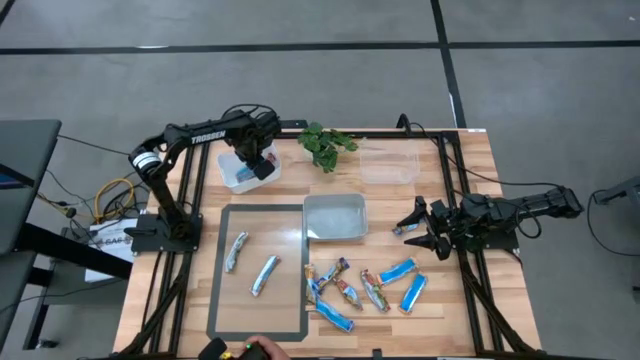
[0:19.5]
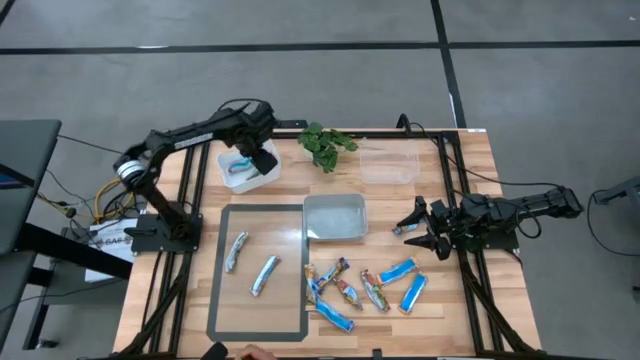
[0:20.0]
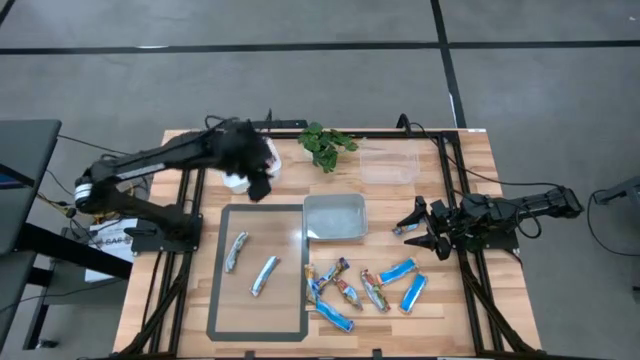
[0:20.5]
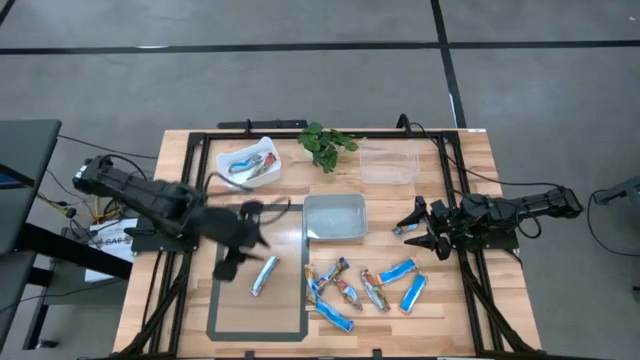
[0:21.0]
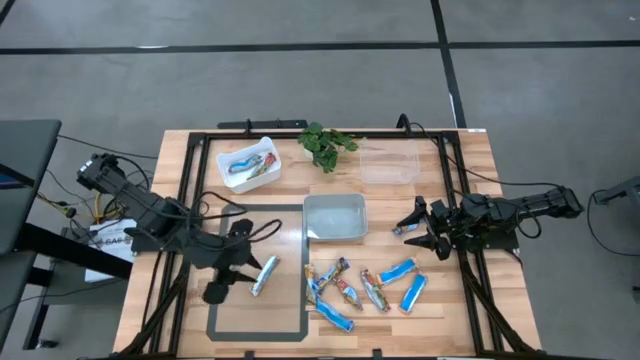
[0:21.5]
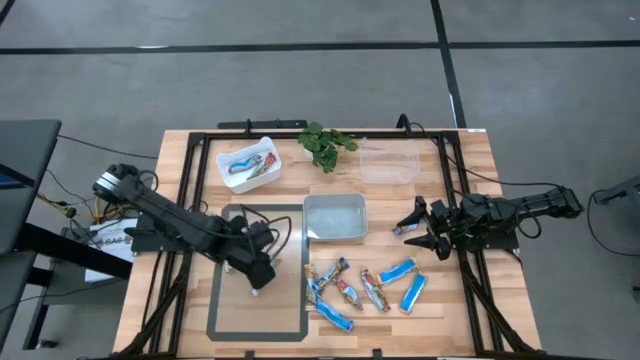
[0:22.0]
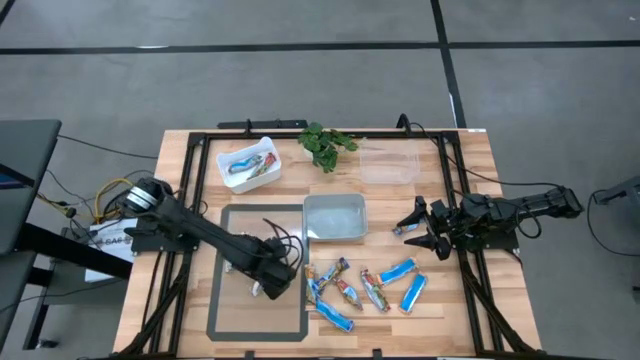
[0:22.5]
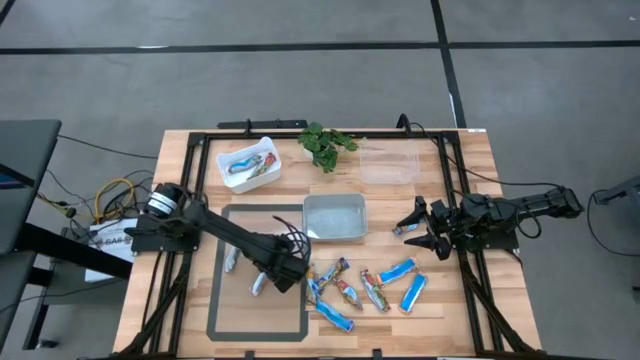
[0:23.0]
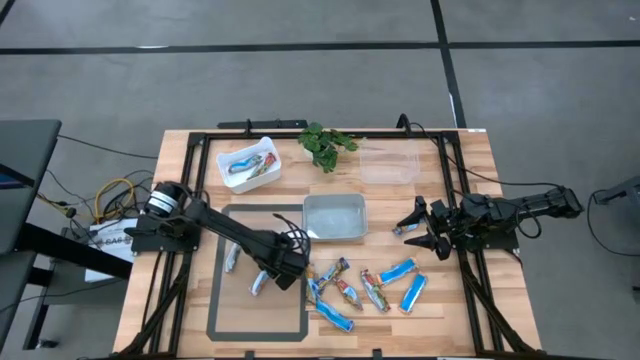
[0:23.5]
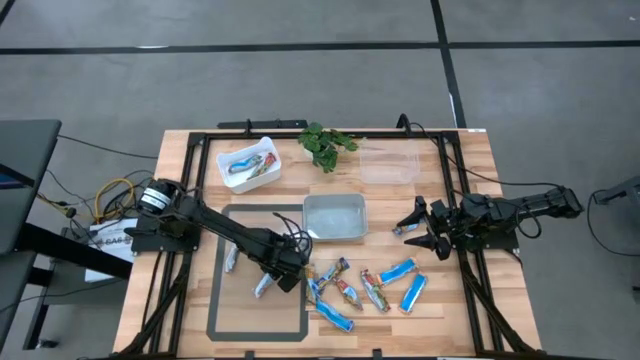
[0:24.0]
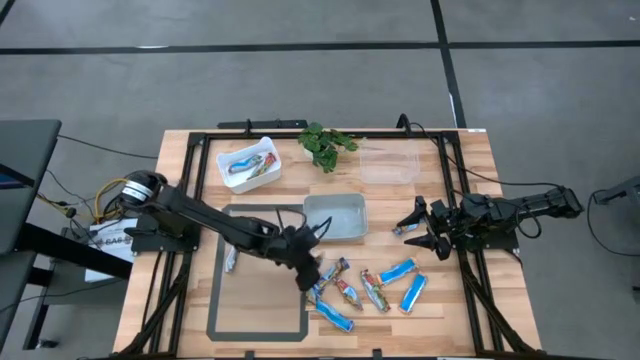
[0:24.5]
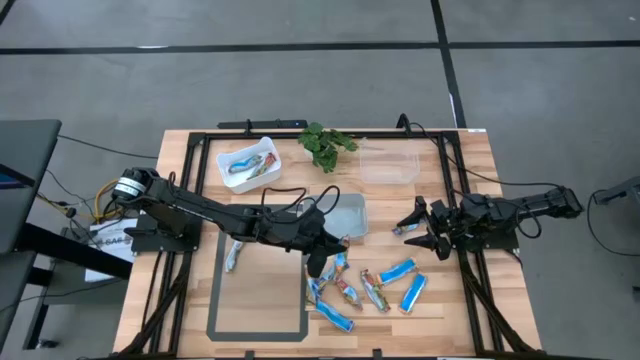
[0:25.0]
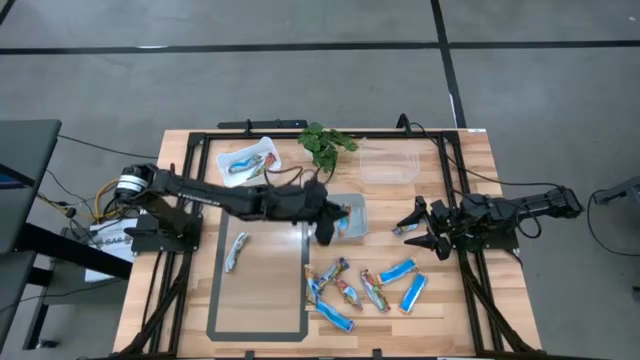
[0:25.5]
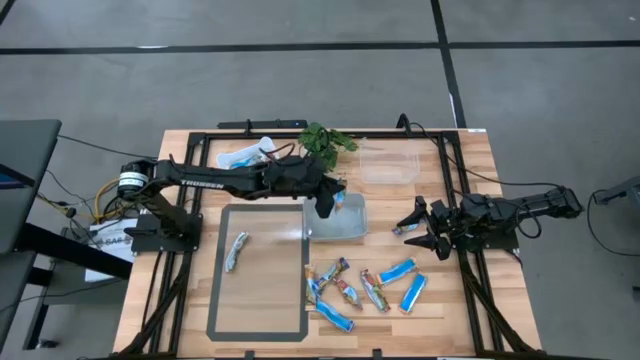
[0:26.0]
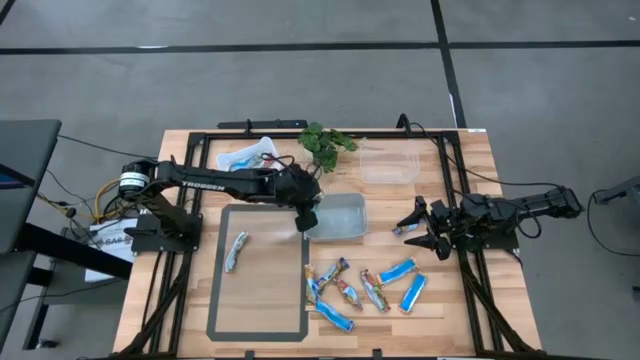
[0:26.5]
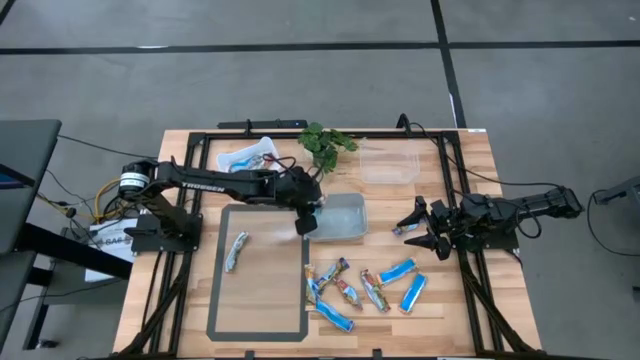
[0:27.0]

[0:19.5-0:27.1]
Task: Pick and place Granola Bars by type
Put the yellow granola bar into the gray bin

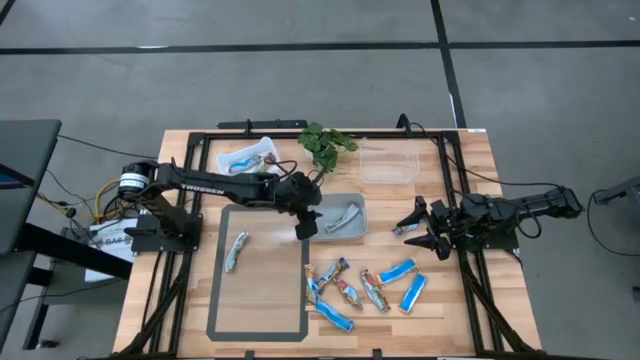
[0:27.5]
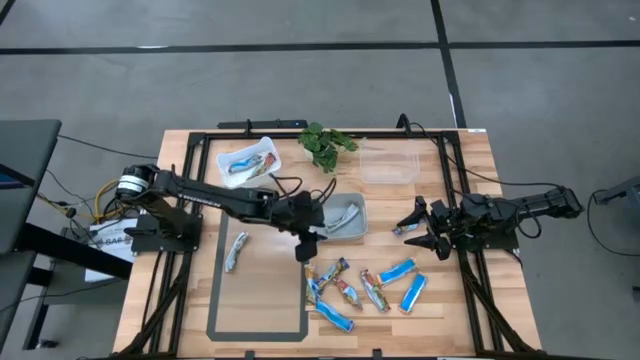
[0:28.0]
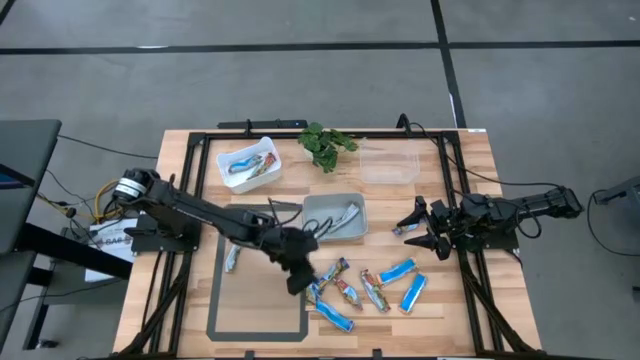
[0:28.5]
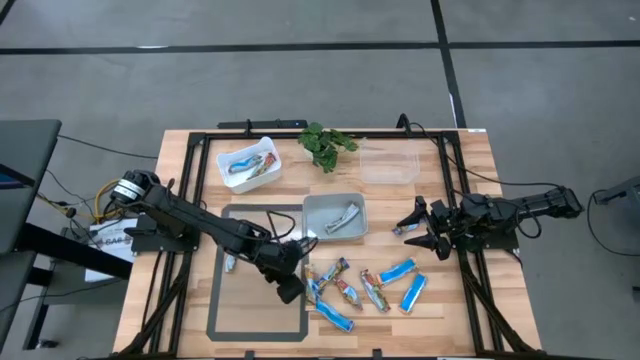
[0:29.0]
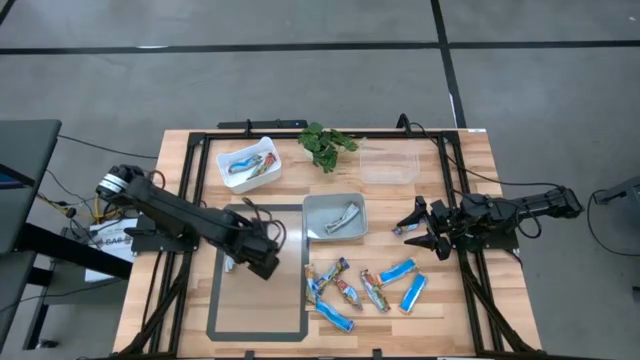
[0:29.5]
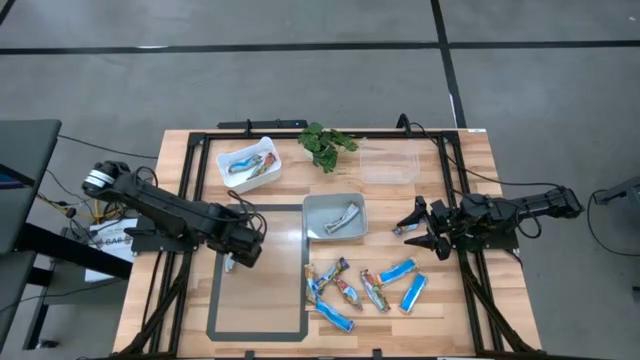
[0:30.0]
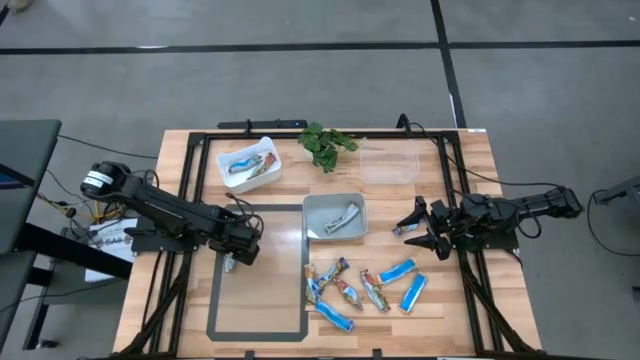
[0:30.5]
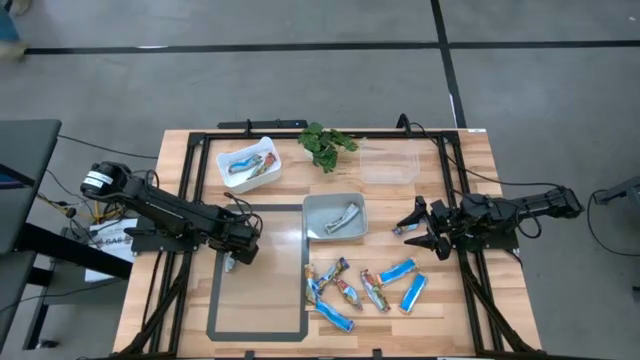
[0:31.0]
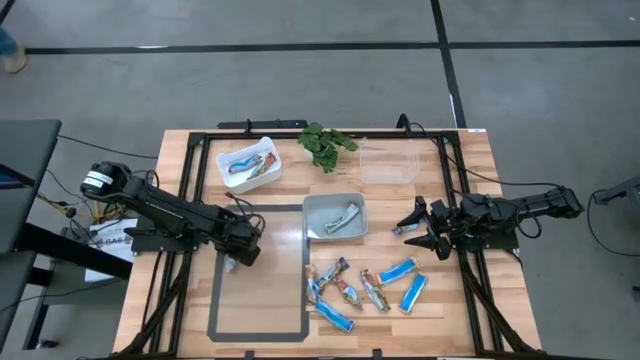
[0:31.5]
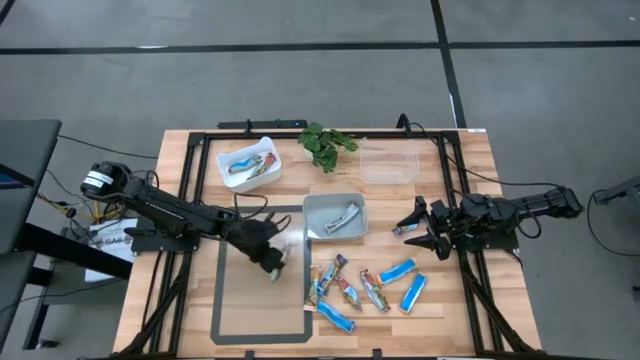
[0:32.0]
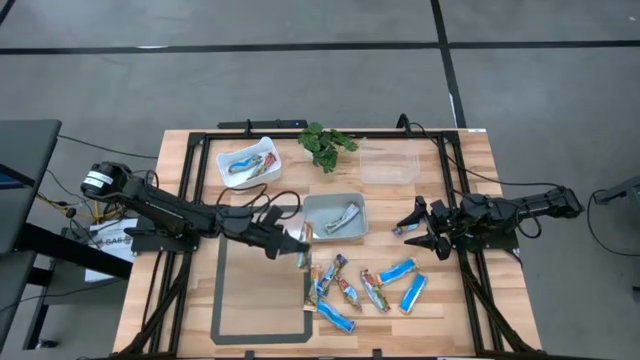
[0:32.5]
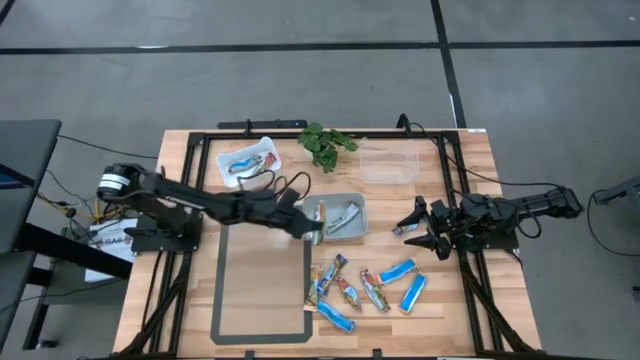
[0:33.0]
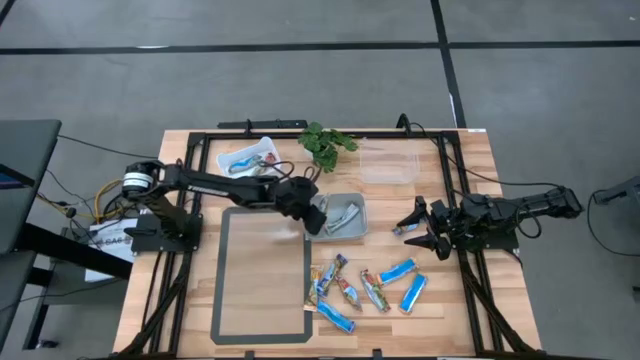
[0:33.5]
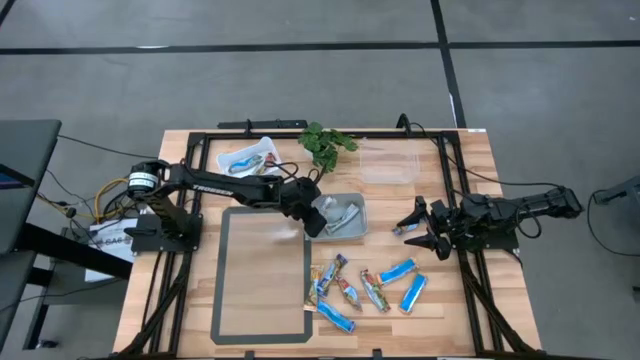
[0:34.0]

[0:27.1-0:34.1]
Put the yellow granola bar into the gray bin

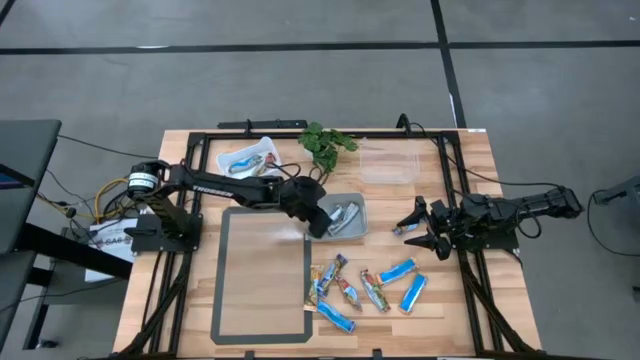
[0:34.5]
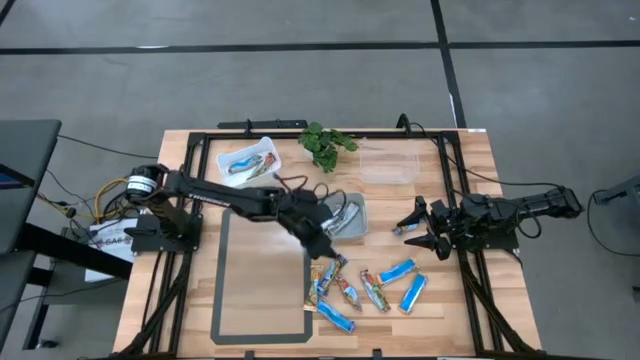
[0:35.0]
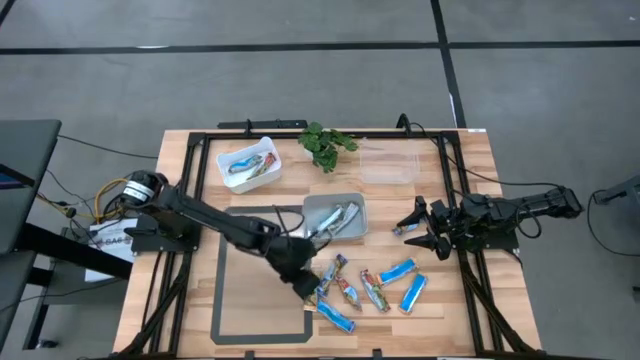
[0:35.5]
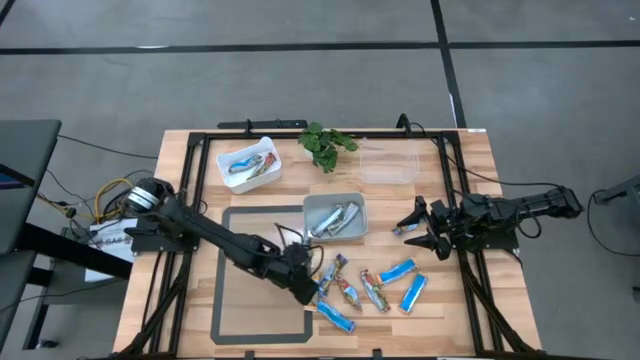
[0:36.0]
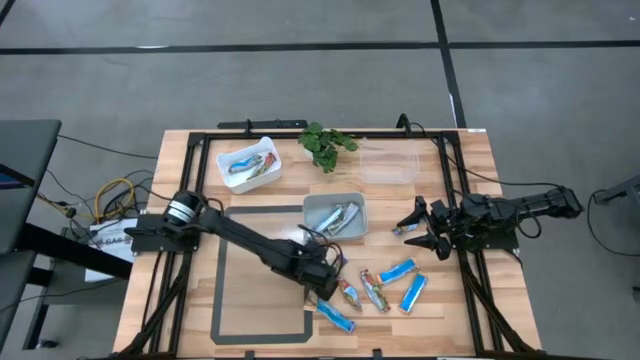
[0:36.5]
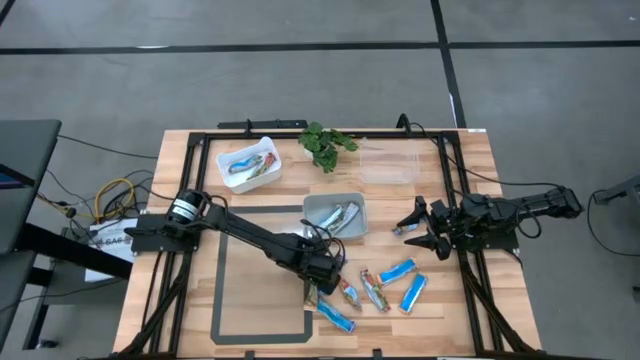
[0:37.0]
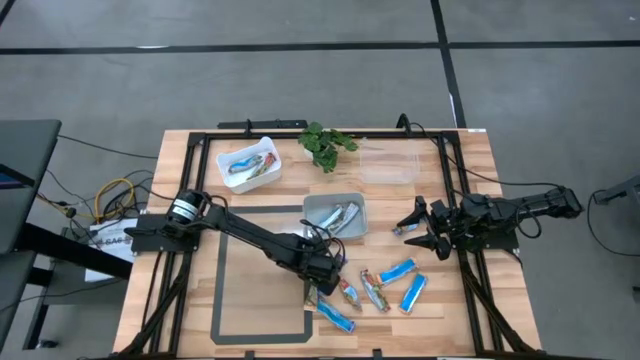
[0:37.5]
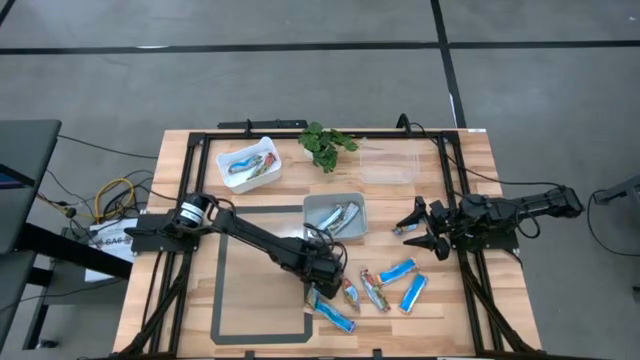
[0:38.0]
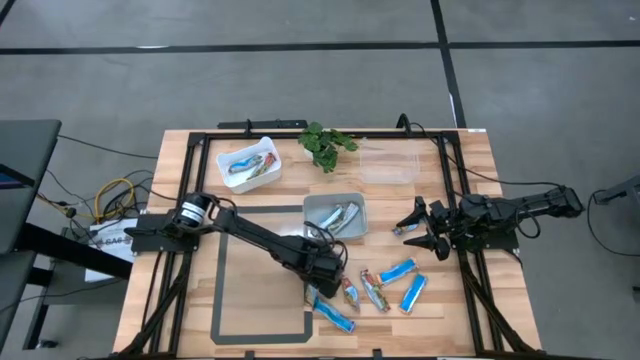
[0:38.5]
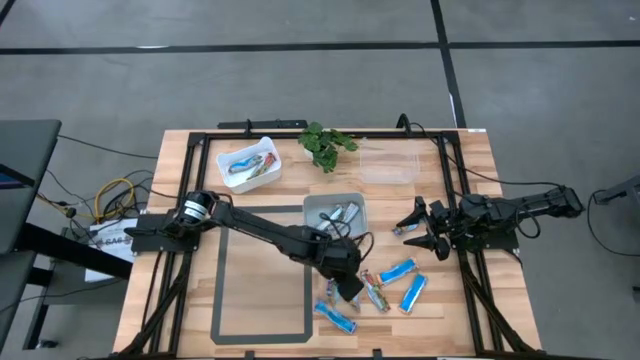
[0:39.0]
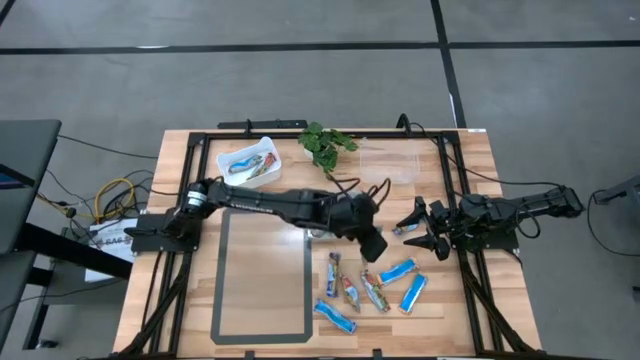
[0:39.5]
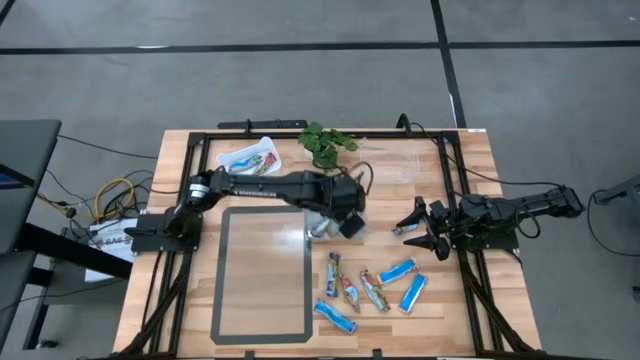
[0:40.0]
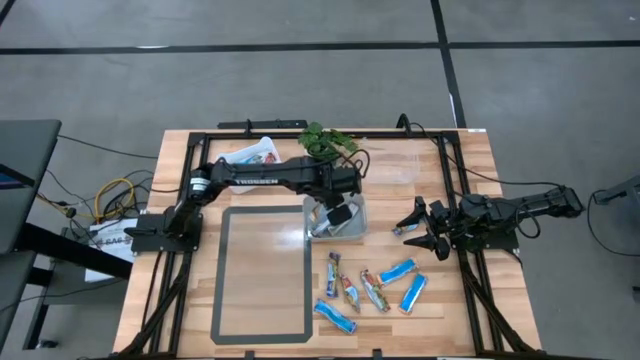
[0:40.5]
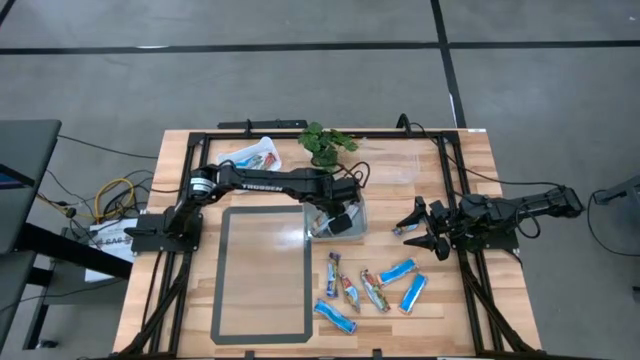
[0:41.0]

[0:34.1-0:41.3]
Put the yellow granola bar into the gray bin
